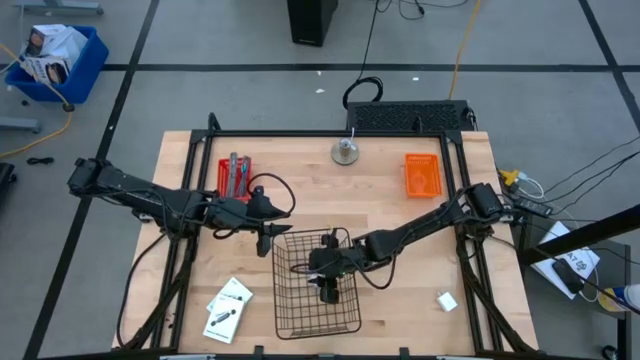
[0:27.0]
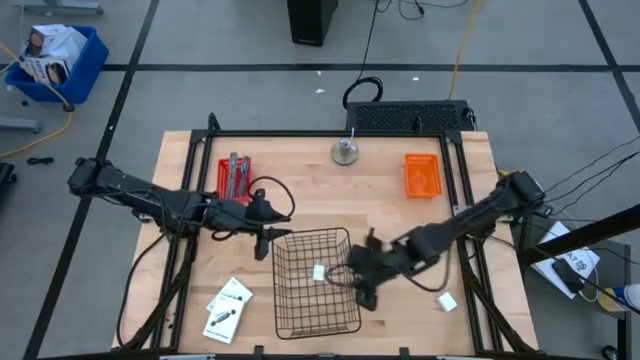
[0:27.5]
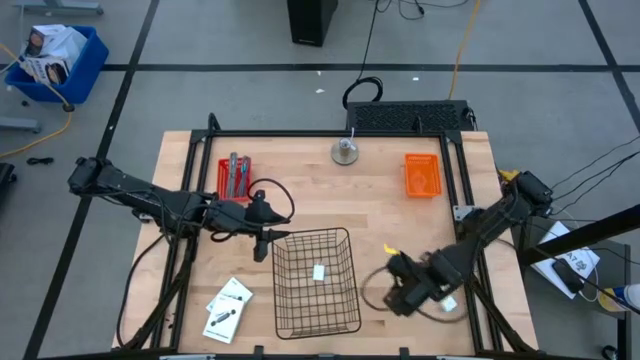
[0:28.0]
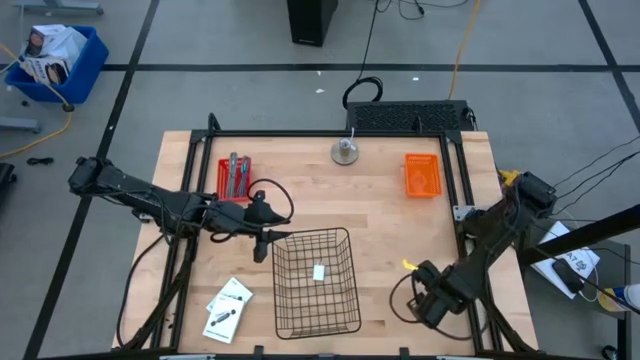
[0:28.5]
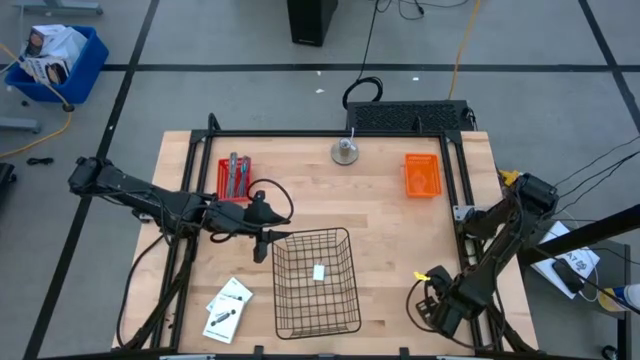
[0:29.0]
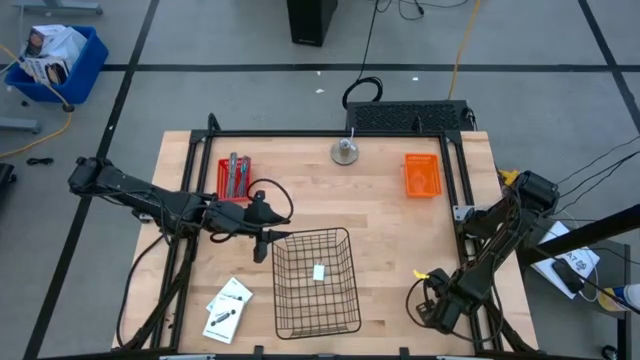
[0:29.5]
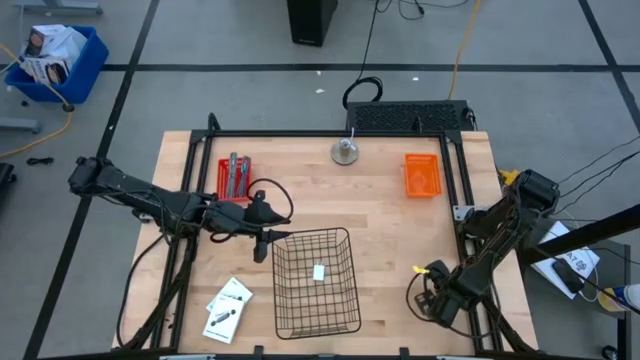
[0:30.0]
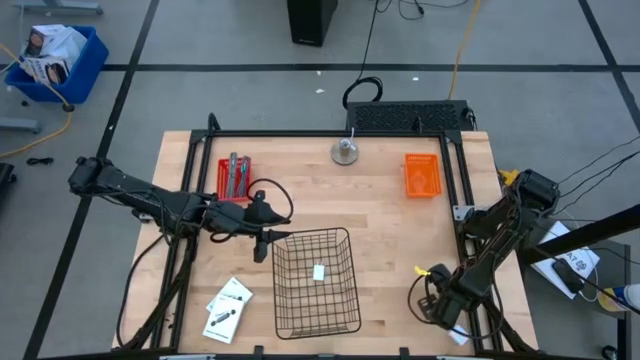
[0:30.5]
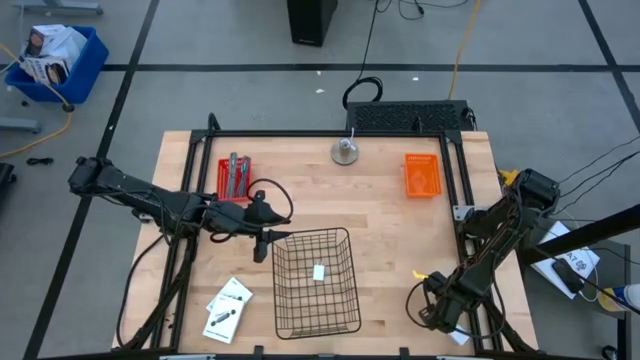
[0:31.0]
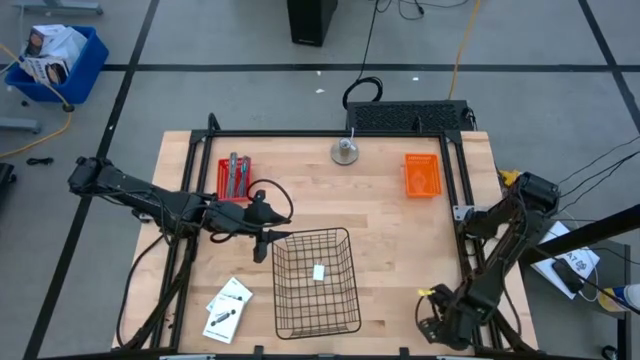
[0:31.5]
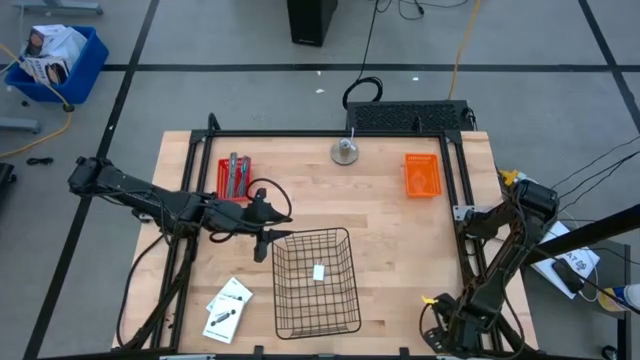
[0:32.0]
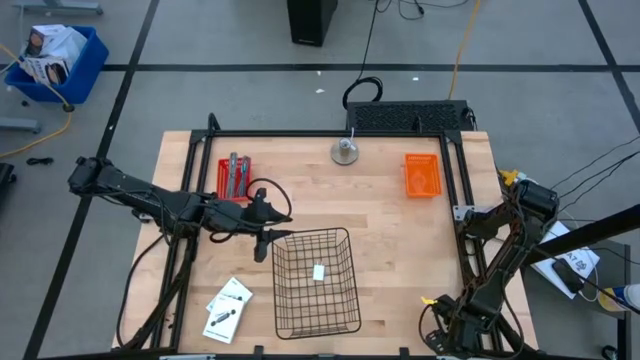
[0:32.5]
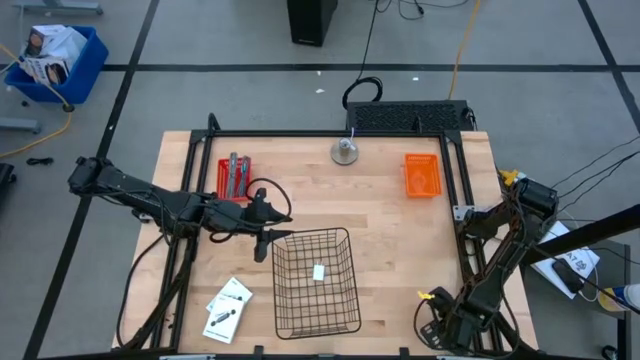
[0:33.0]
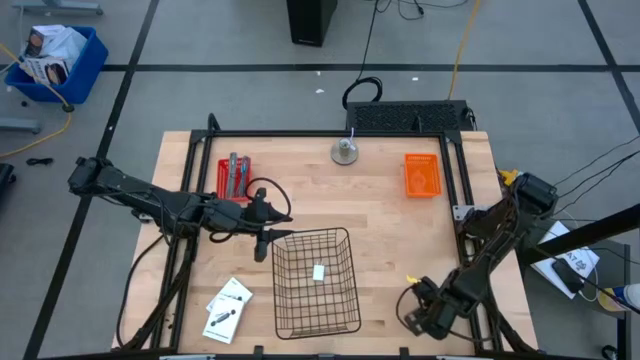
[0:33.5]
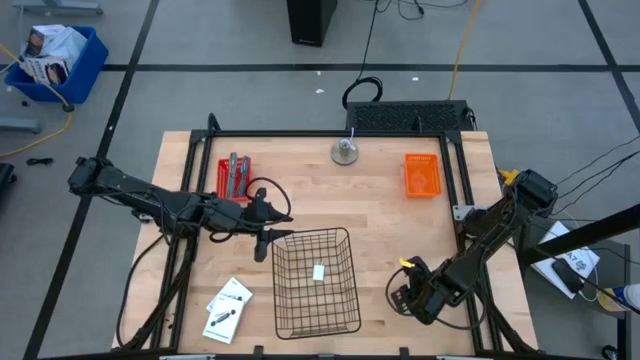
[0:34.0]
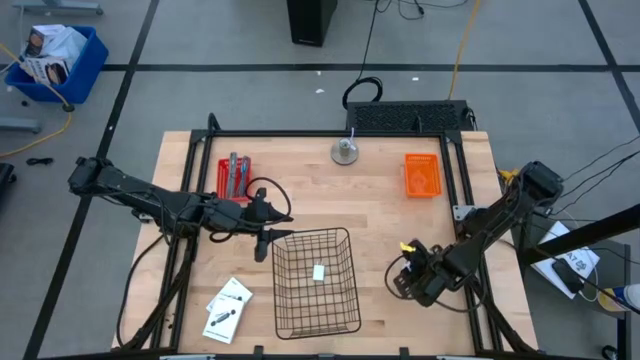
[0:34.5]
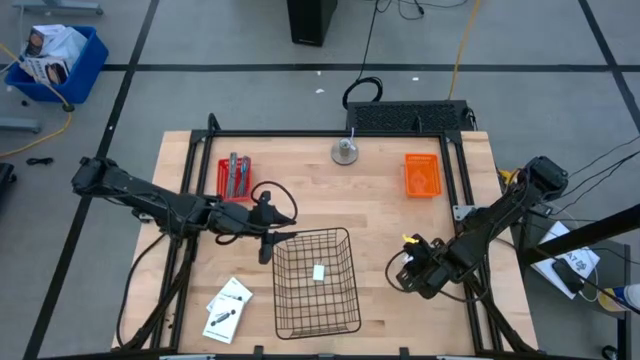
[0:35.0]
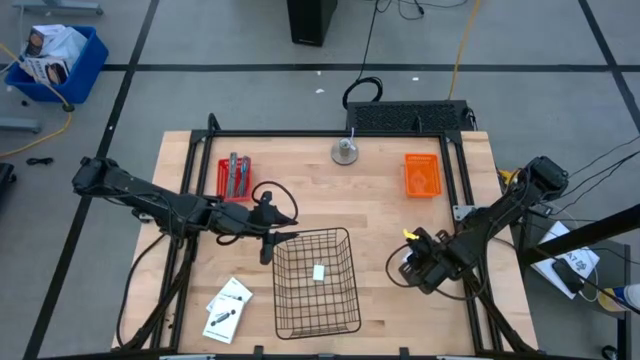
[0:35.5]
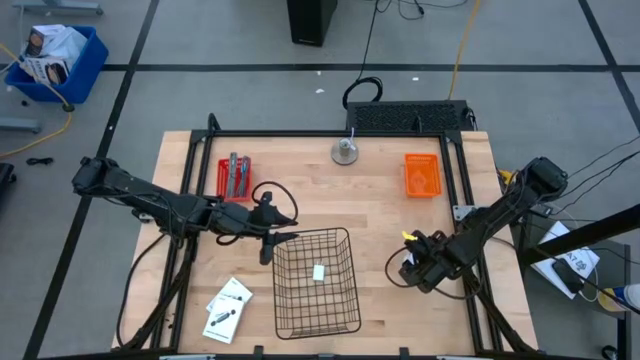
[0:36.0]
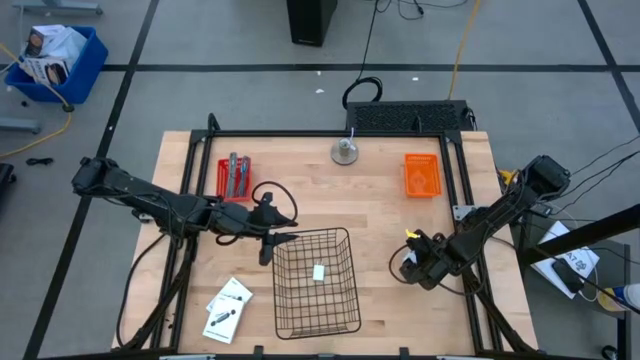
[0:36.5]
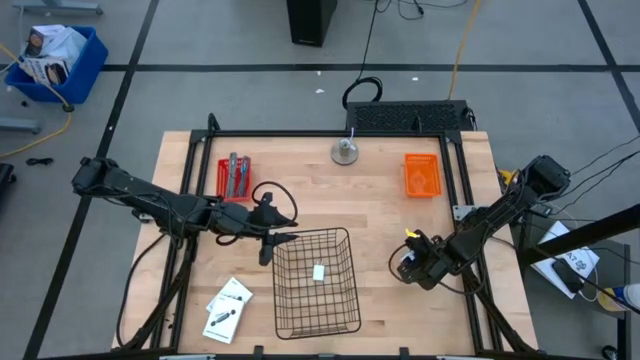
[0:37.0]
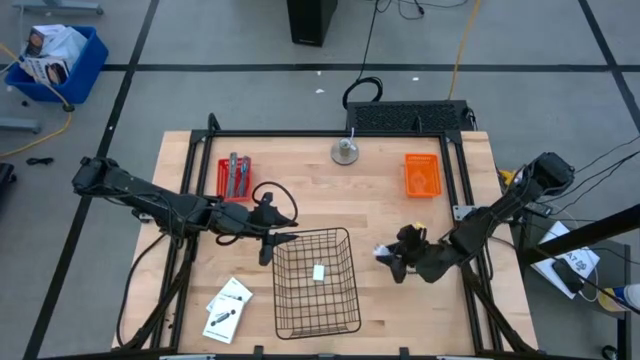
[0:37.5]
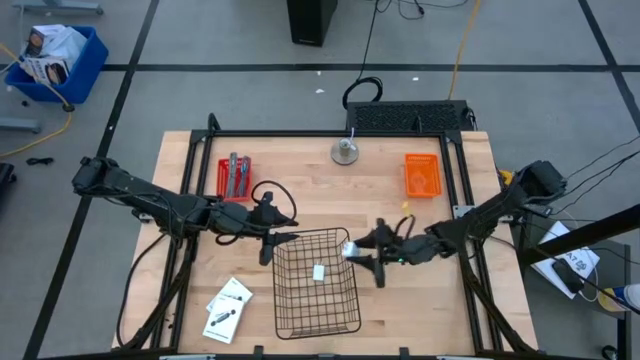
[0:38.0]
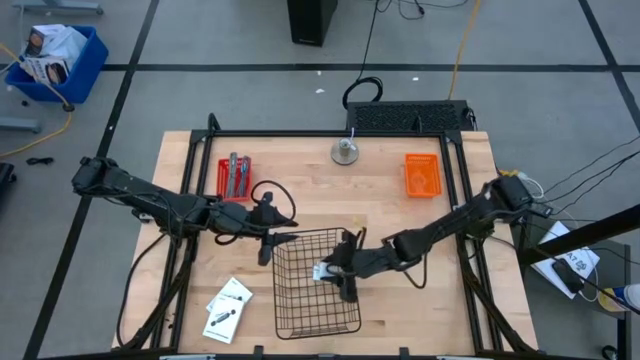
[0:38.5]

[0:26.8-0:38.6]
Task: Pick and place items into bin
Put the charger adapter into the black wire basket

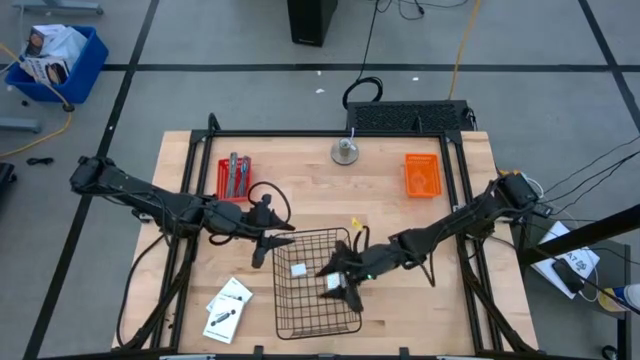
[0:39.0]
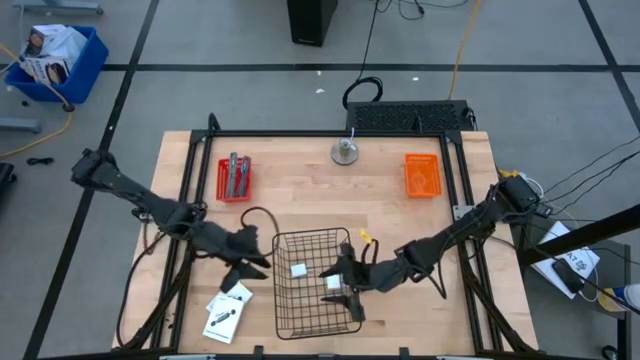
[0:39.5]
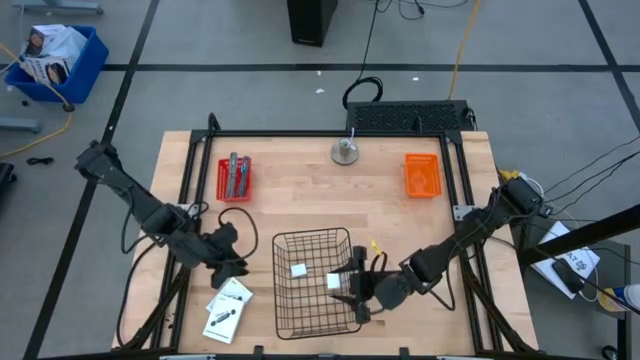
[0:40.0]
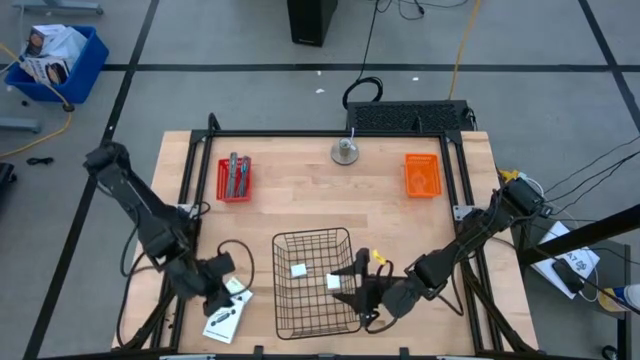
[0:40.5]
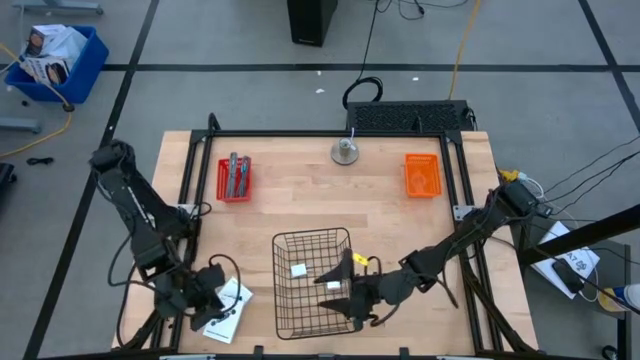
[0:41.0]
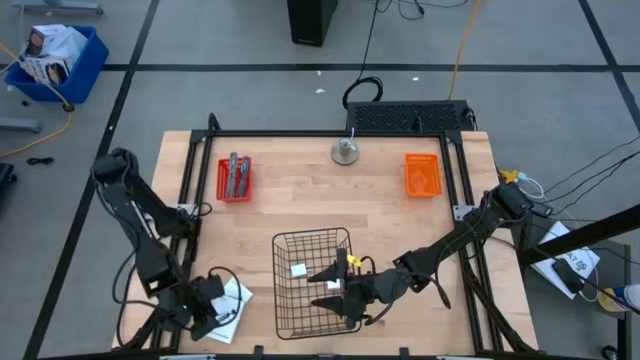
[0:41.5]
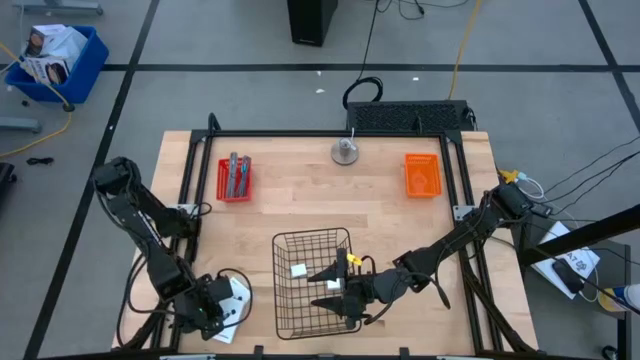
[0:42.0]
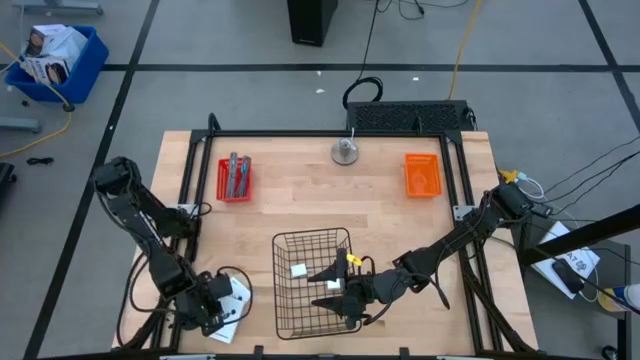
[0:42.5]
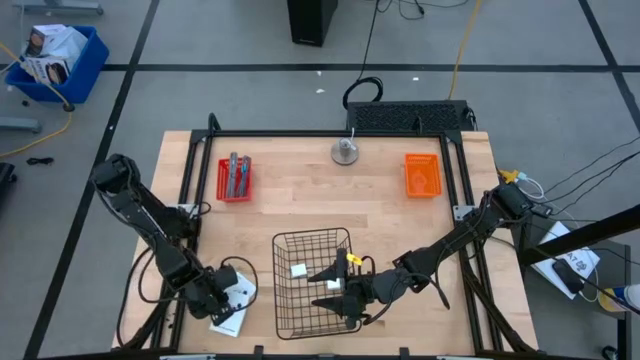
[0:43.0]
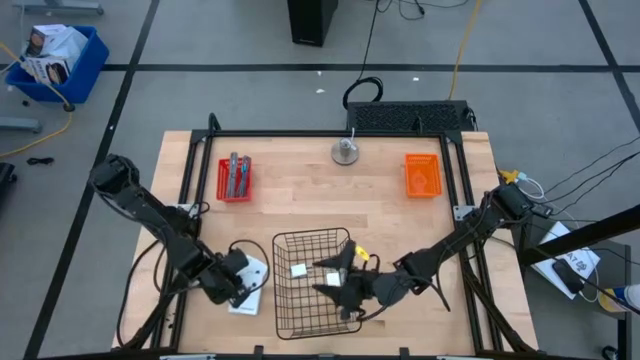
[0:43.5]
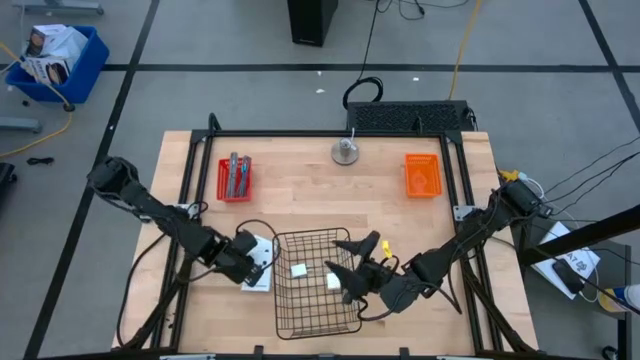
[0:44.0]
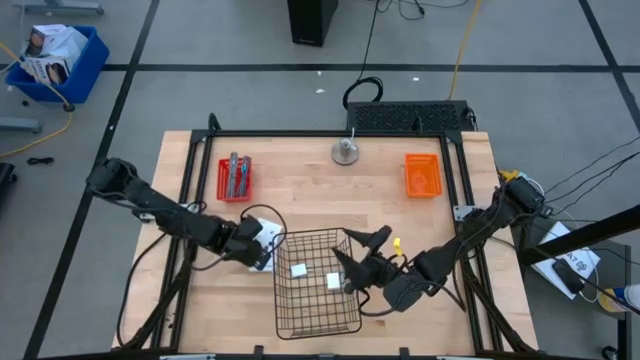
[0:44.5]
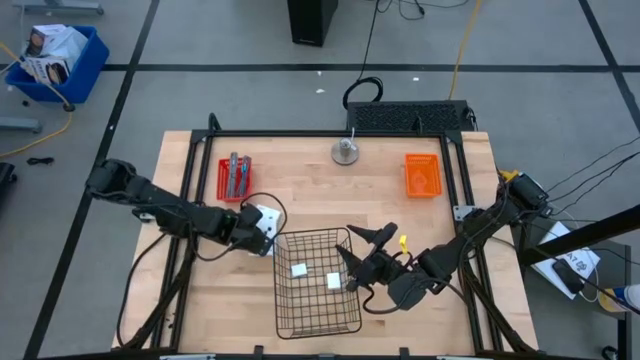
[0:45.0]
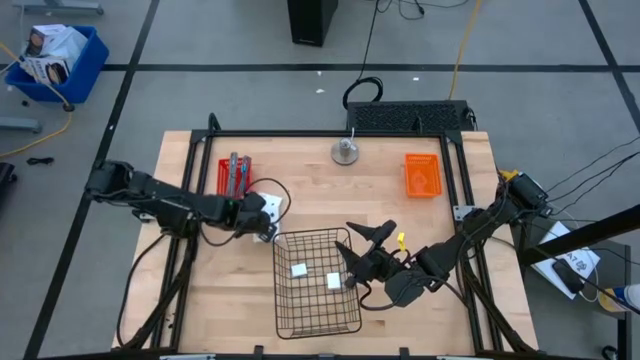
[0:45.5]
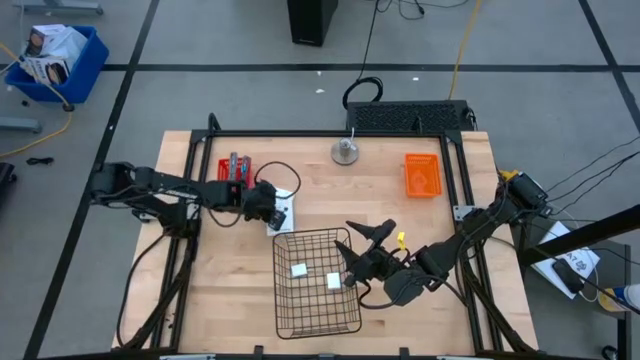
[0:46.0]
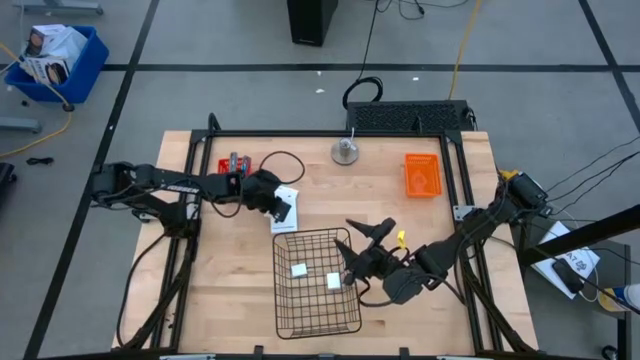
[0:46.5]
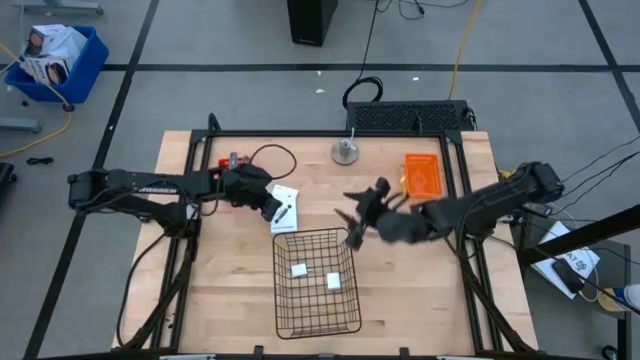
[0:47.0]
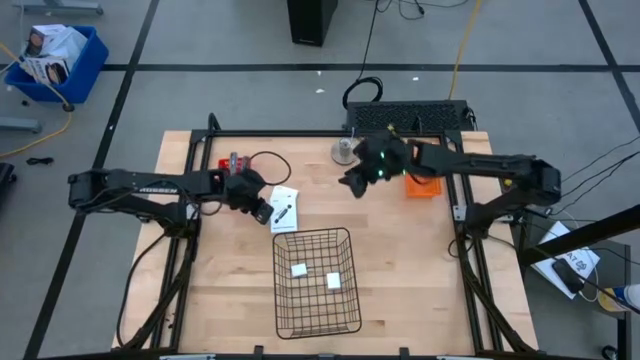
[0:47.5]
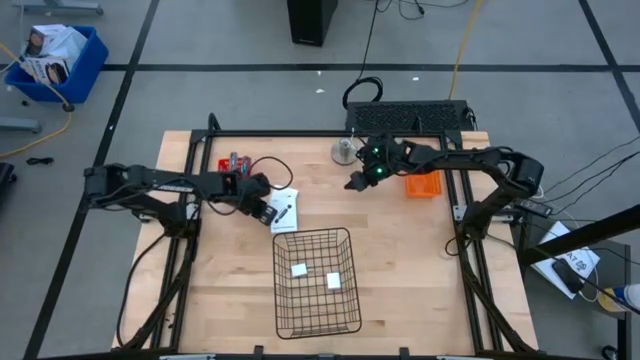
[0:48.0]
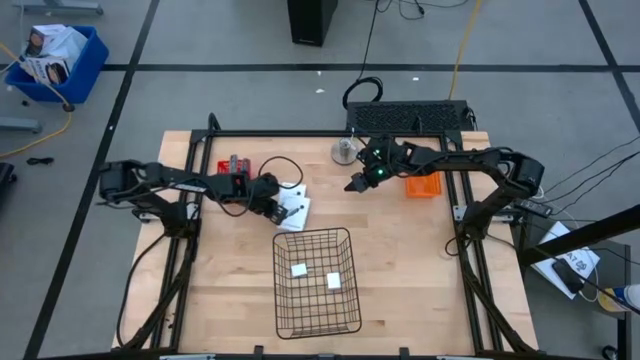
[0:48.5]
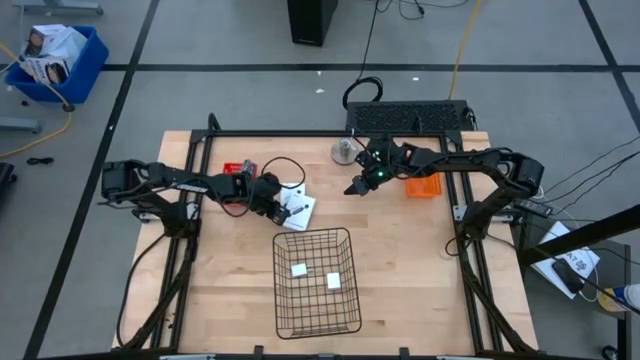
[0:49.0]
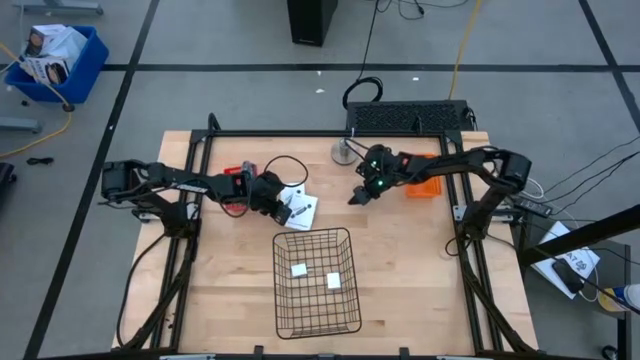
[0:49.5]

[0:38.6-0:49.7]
Adjust the white card reader boxes to the middle top of the table
